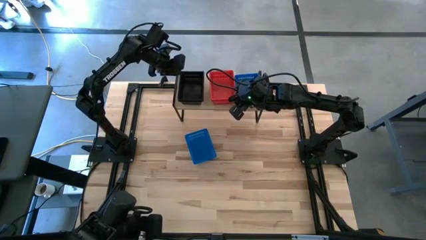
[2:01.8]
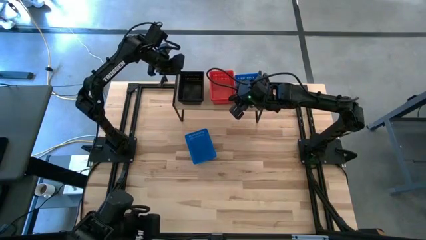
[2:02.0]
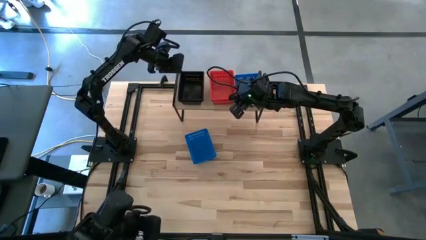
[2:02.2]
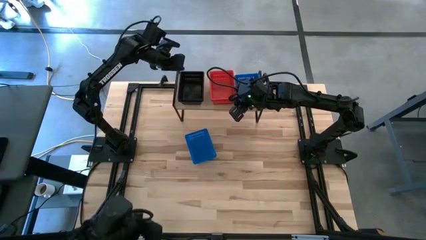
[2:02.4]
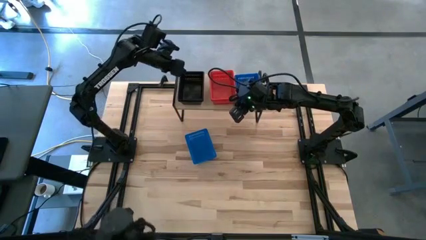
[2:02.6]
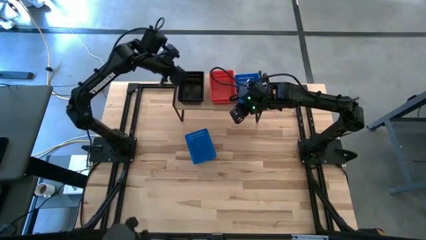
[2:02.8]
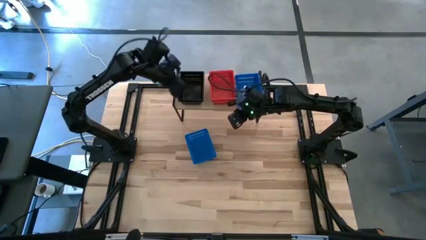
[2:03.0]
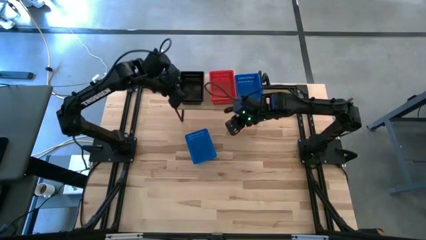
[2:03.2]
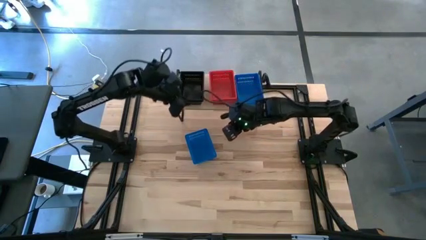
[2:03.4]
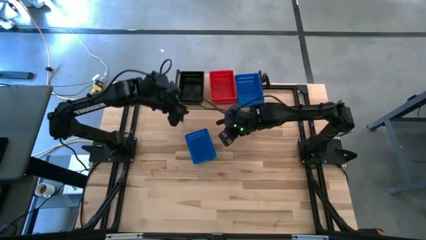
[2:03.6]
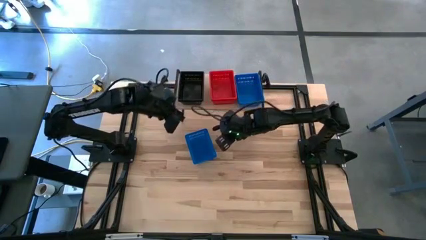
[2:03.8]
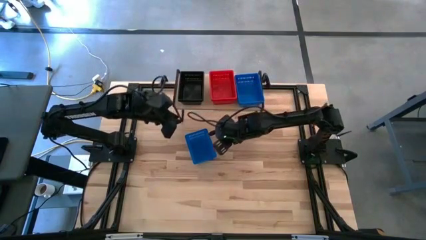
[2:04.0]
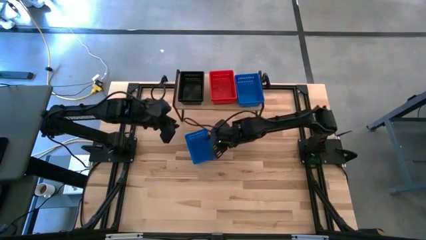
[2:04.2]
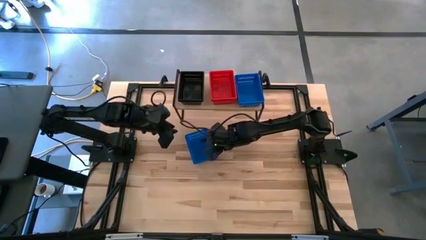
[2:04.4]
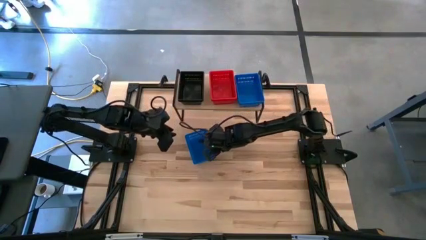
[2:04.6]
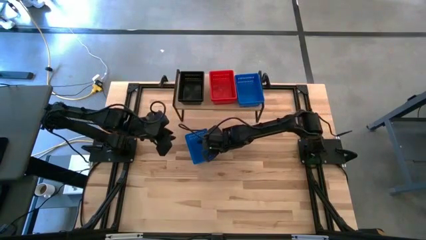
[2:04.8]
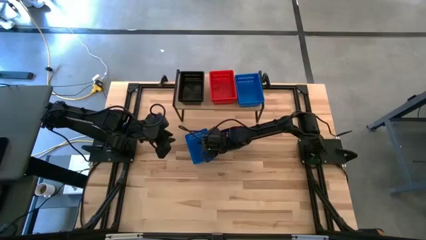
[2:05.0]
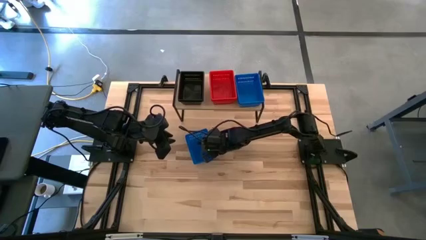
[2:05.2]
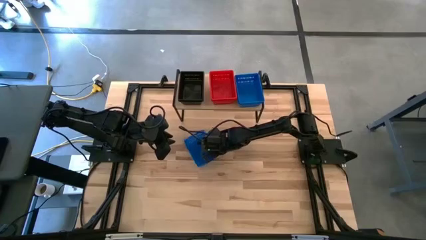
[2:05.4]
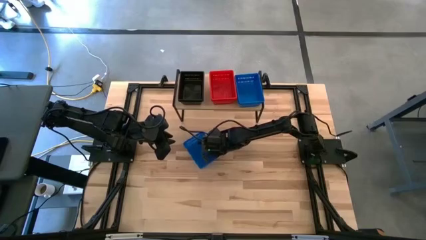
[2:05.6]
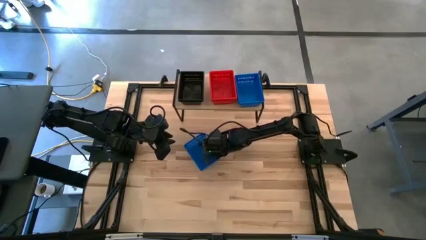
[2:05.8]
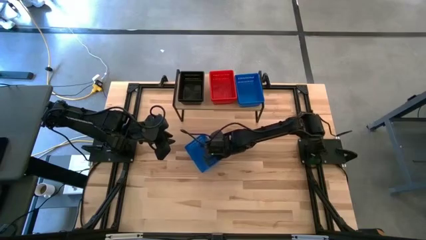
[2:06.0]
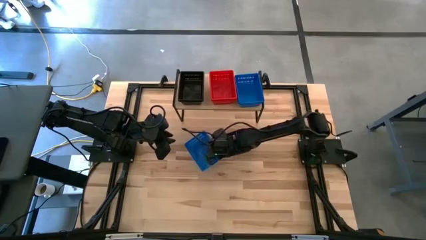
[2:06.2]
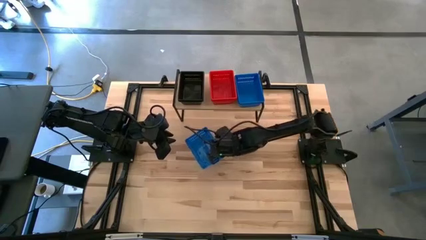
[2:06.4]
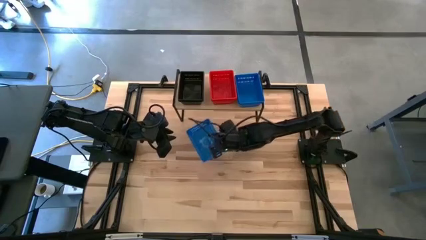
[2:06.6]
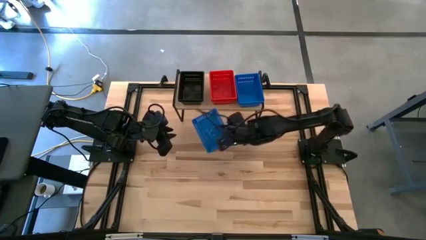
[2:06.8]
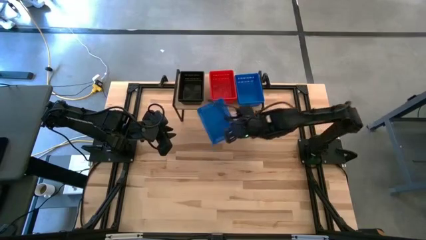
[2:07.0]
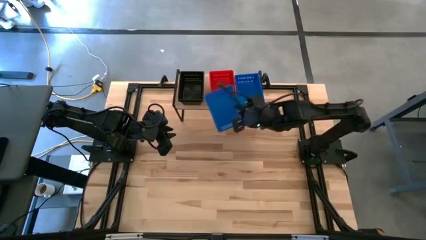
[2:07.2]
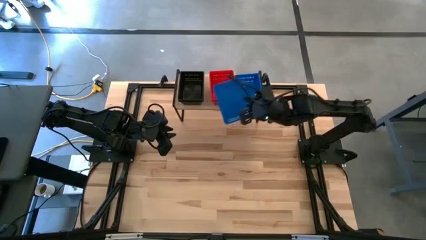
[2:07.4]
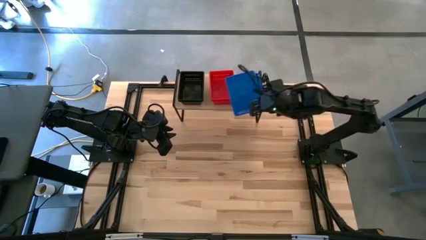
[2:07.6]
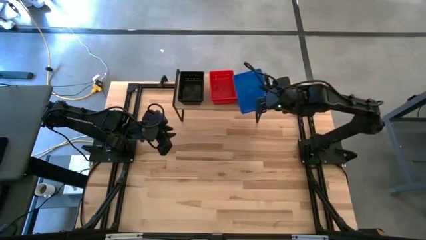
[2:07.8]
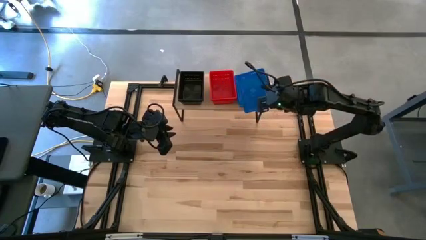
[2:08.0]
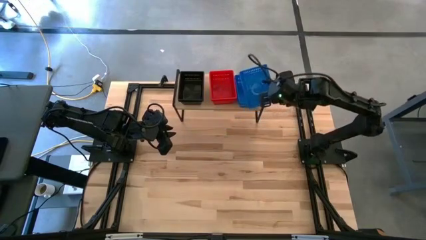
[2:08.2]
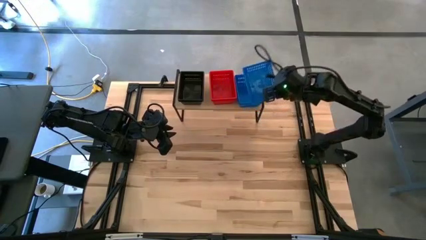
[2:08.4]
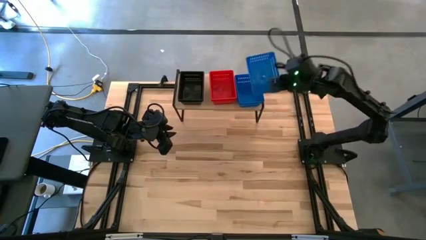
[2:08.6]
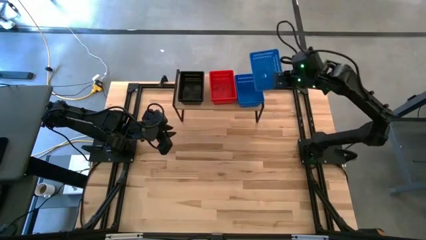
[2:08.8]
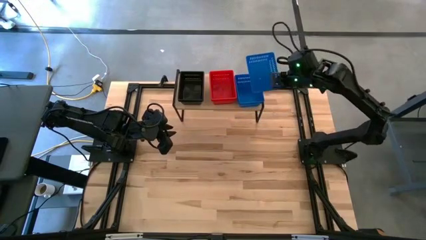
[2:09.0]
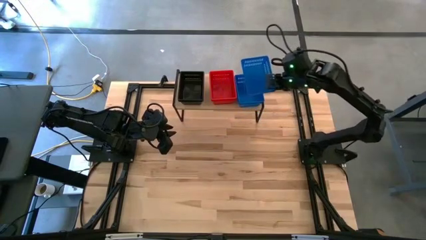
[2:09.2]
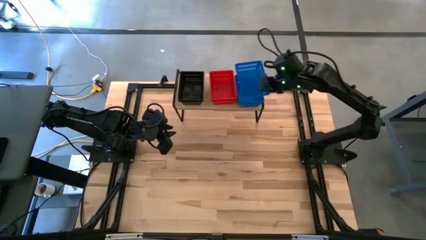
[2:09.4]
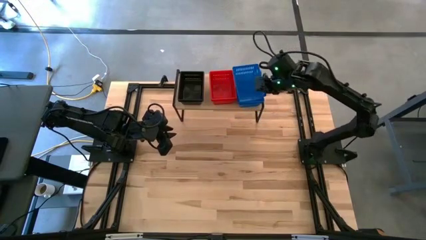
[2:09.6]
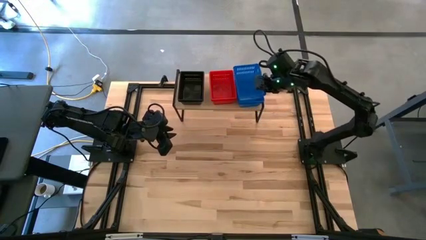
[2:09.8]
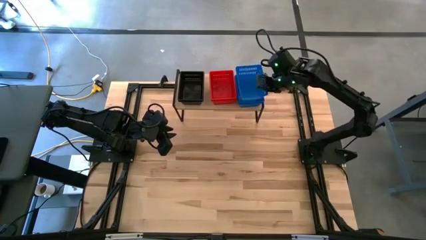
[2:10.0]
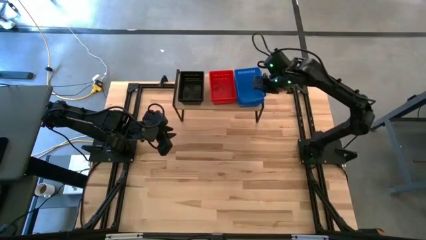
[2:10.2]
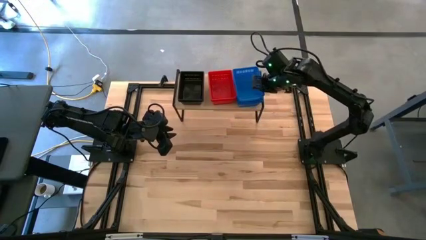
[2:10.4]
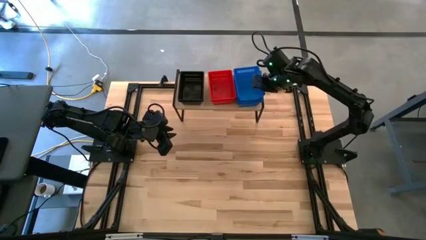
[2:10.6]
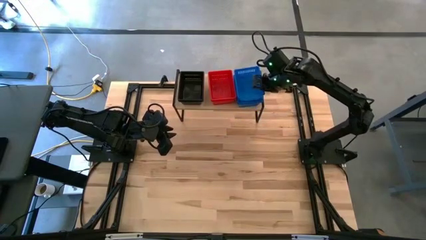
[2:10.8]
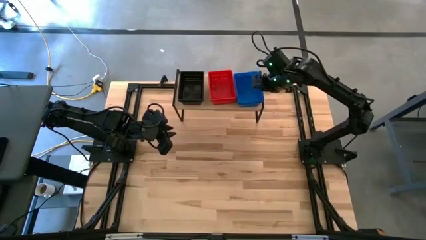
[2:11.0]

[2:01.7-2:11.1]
Task: Stack baskets on shelf by color
Stack the blue bin on top of the stacked blue bins on the shelf

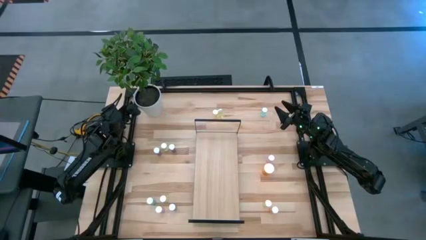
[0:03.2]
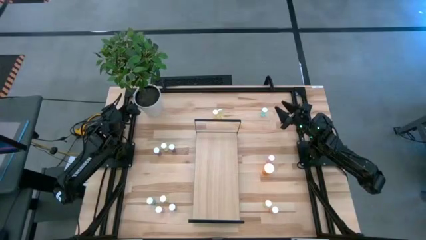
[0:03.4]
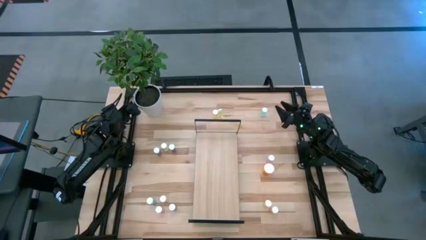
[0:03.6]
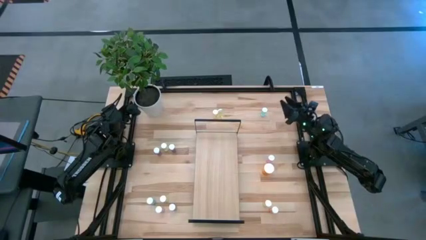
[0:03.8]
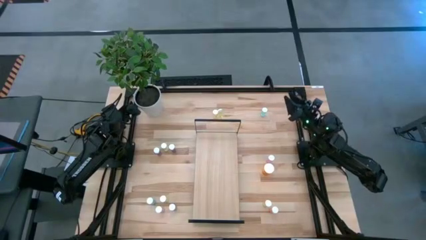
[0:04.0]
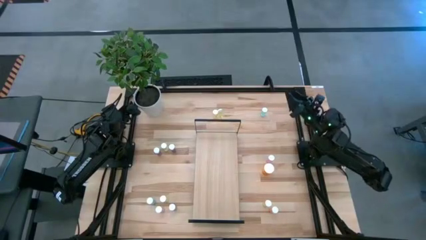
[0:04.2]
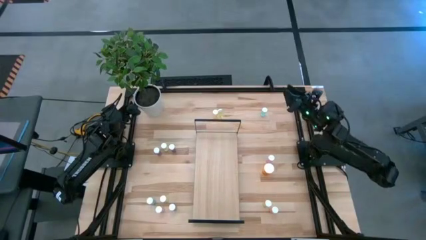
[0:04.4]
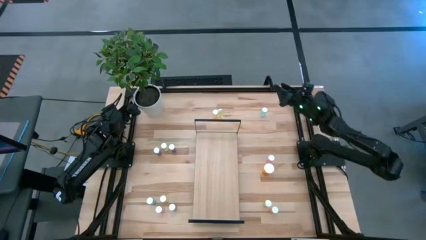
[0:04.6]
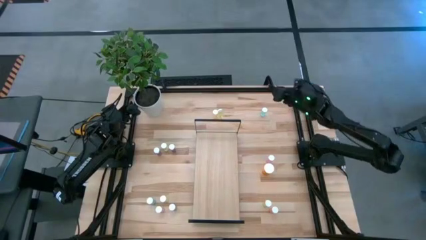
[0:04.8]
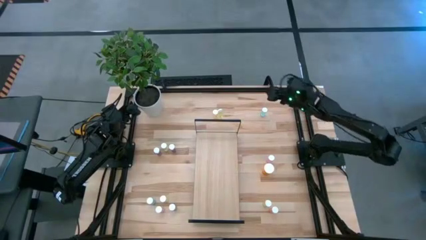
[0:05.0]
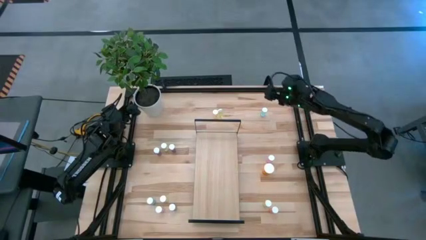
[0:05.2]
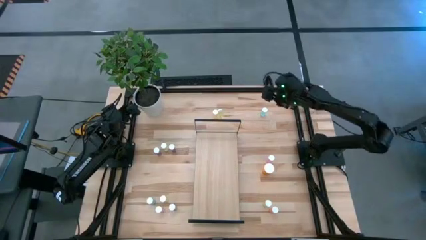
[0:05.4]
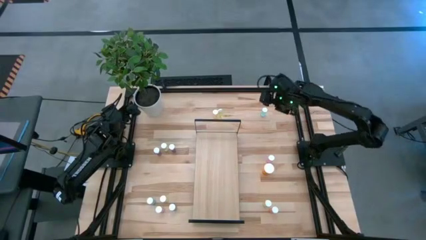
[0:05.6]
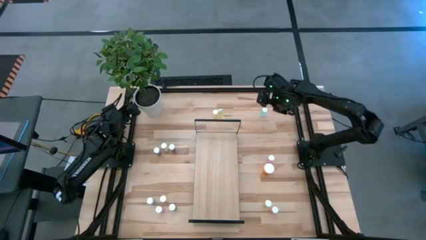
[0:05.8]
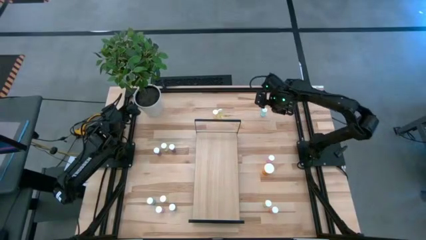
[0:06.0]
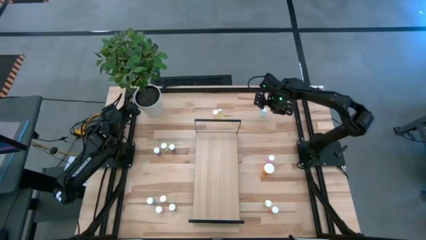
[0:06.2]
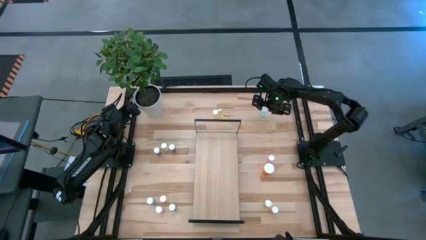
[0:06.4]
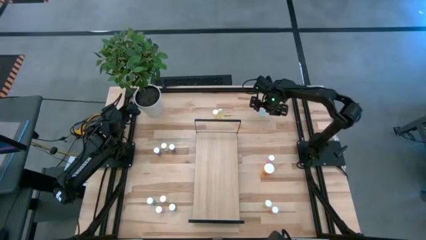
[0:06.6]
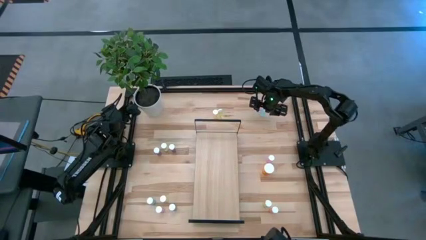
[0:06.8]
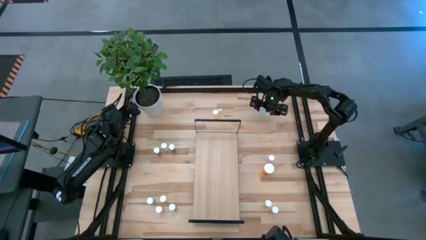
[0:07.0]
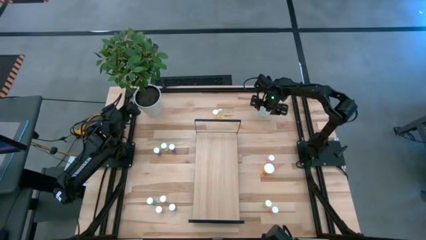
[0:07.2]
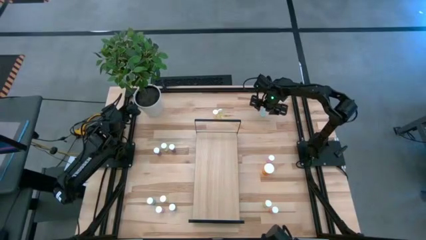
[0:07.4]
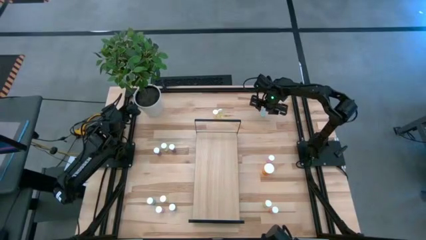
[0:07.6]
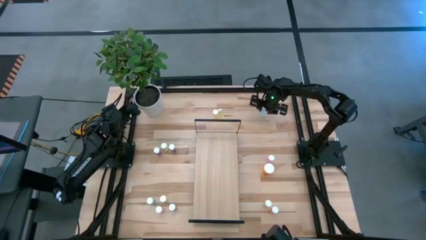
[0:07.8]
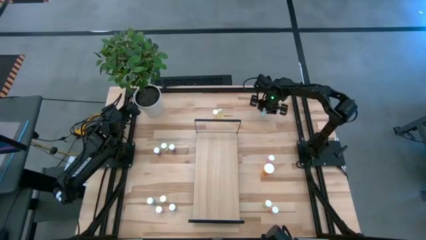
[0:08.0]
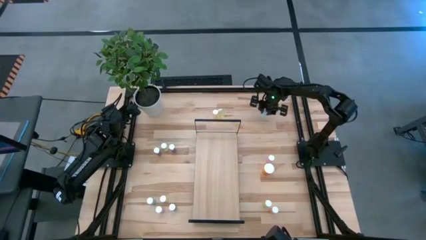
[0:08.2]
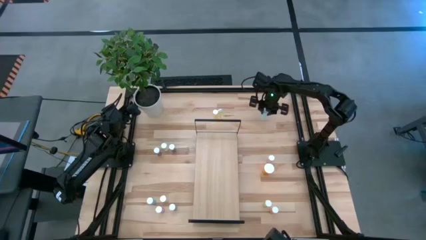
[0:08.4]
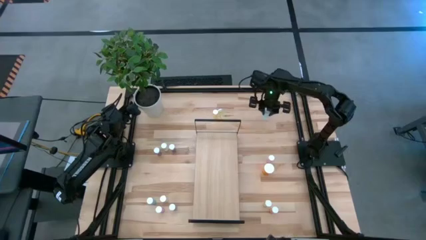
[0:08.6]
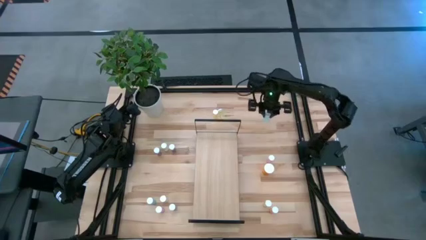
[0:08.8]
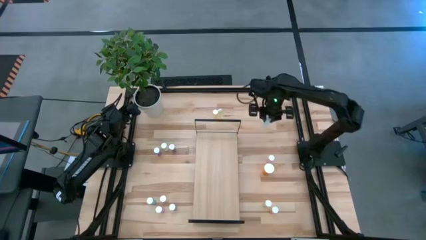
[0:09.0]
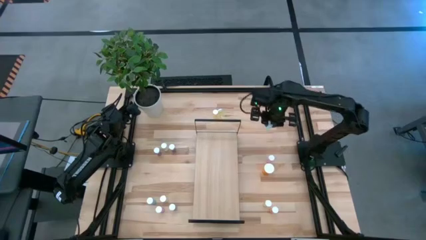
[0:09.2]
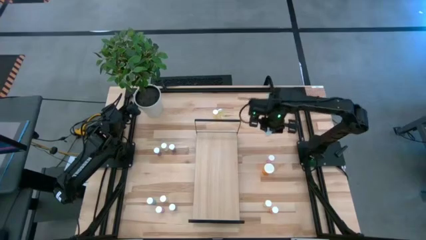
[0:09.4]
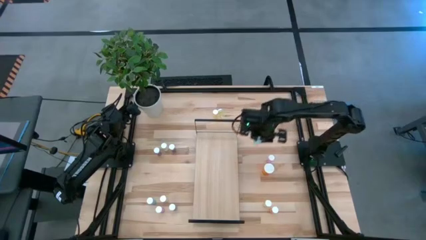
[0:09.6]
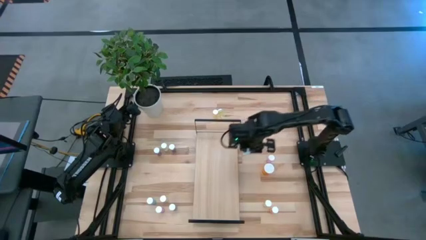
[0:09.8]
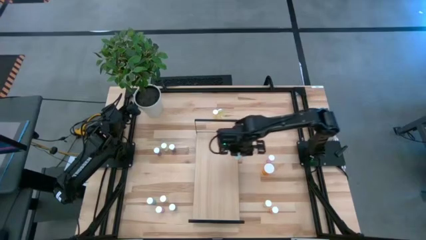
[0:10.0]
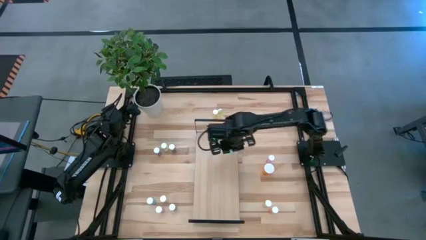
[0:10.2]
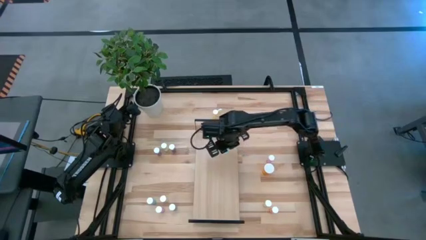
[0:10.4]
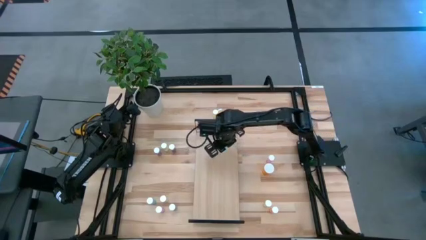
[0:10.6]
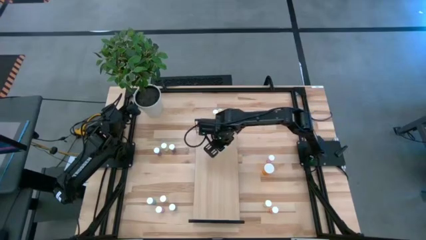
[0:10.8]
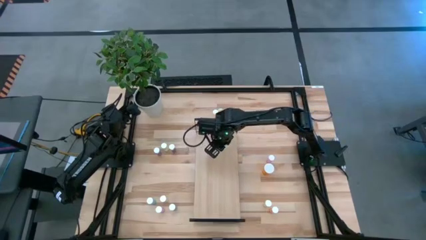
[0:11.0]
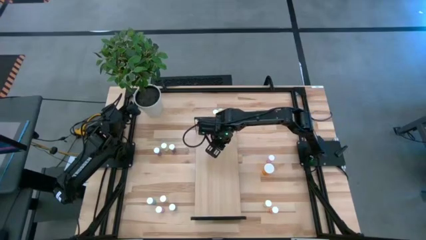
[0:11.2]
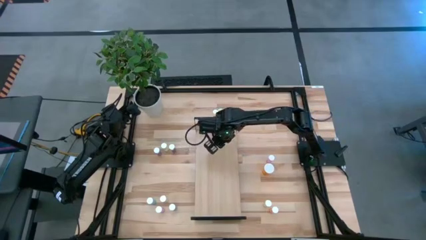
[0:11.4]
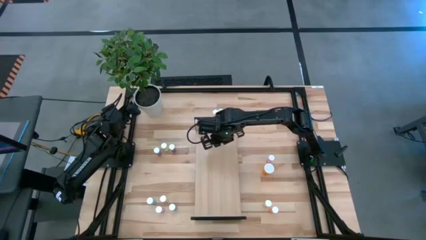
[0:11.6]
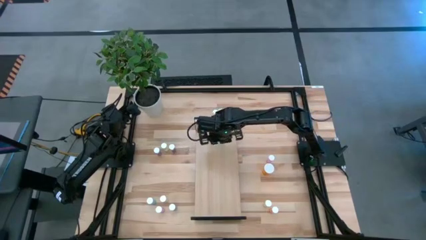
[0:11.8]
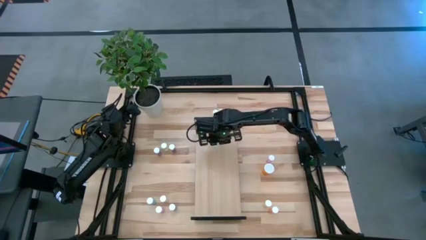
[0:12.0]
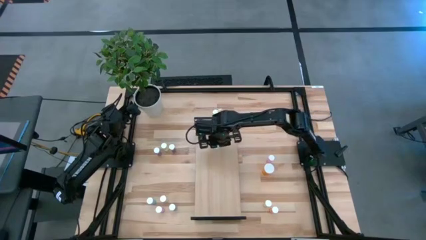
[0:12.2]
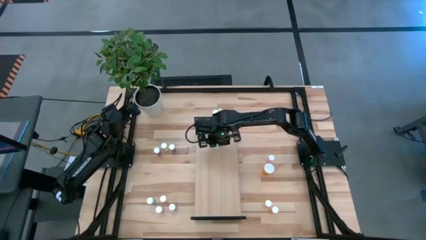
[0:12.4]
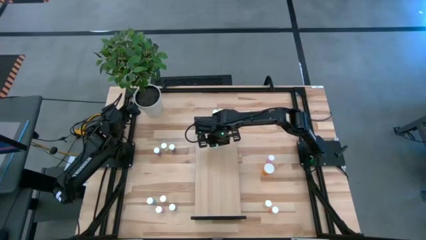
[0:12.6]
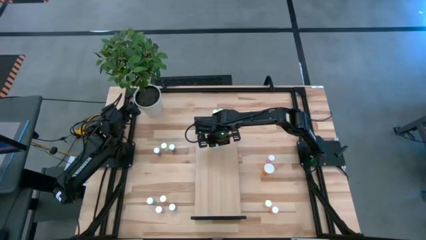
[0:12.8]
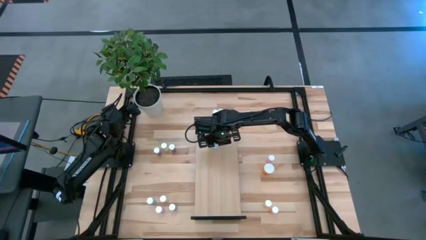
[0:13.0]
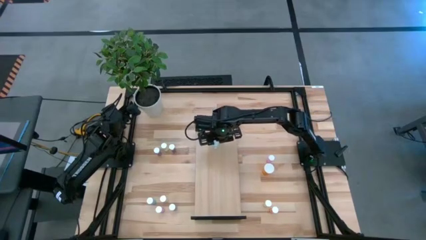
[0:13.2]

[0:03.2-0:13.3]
Task: Pick and place medicine bottles onto shelf by color
Put the blue pill bottle on the shelf
